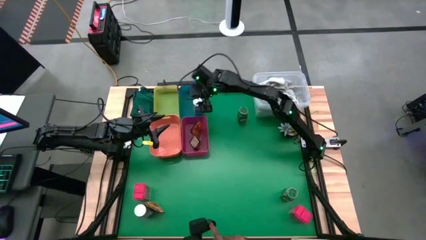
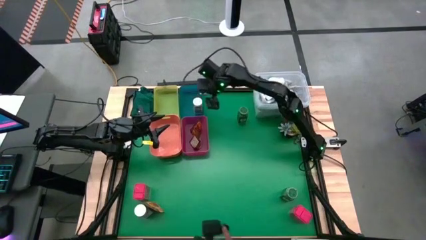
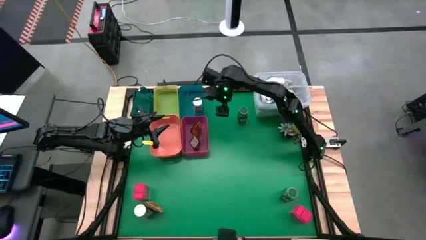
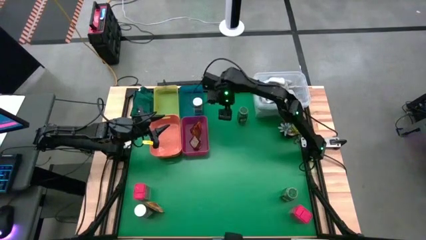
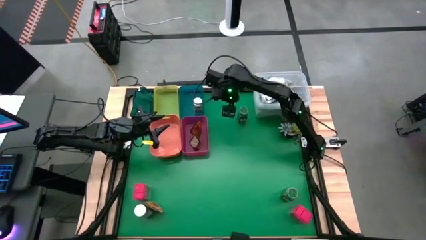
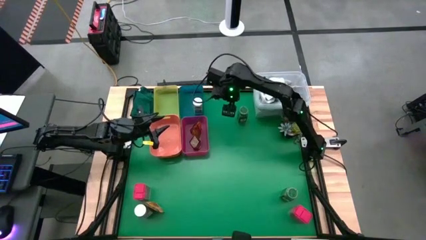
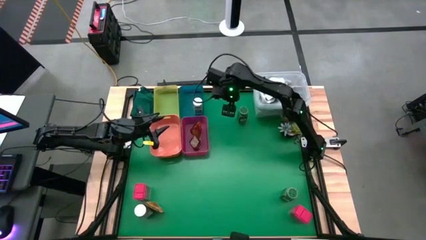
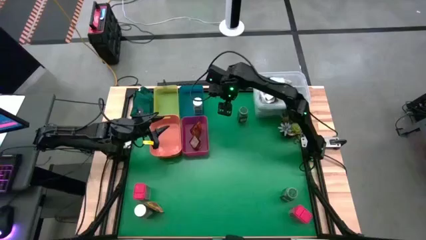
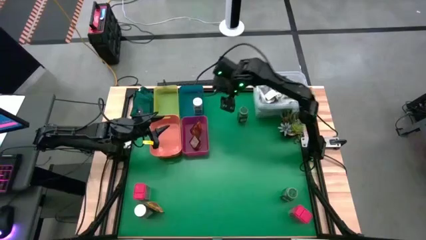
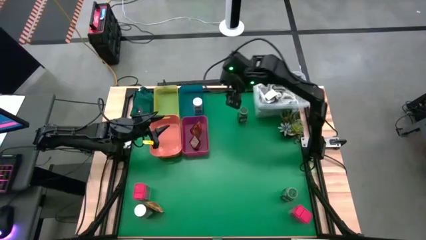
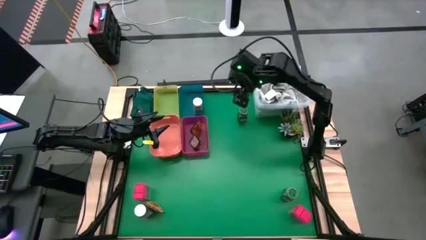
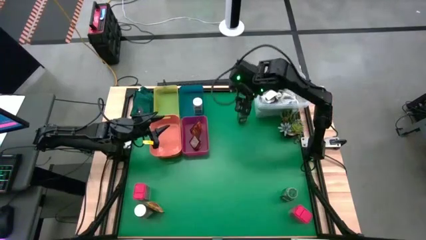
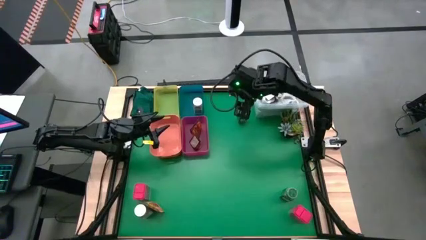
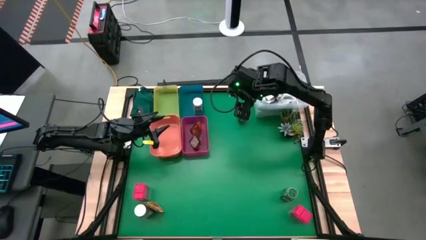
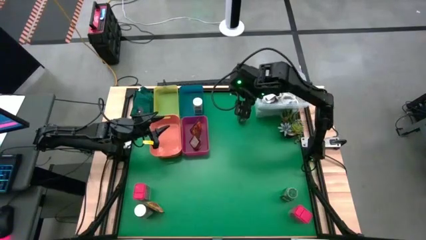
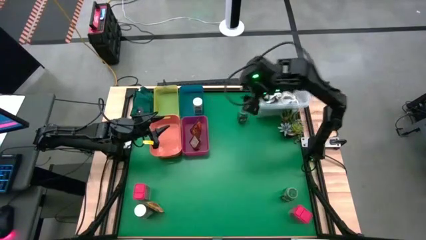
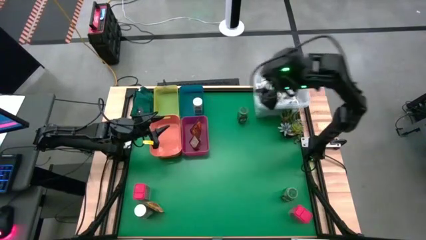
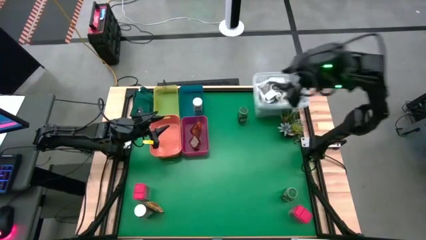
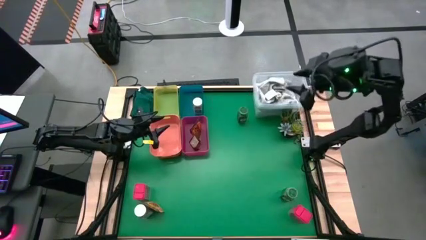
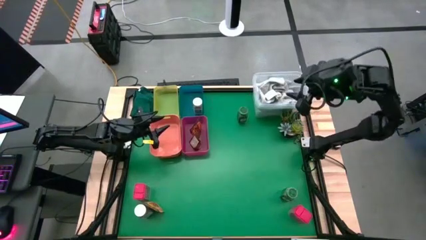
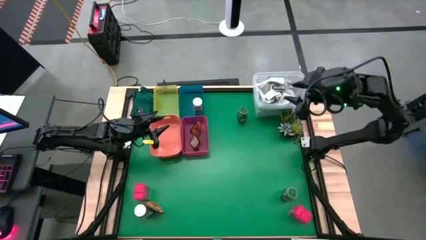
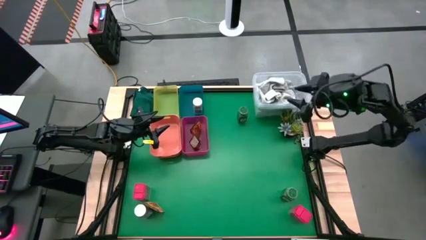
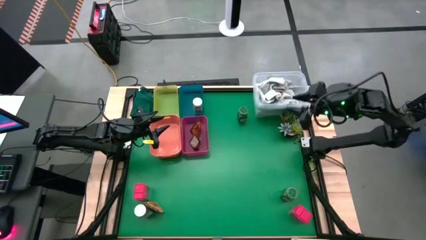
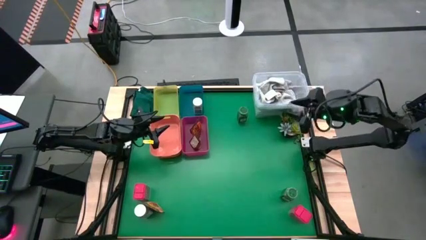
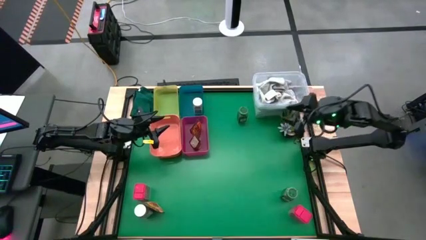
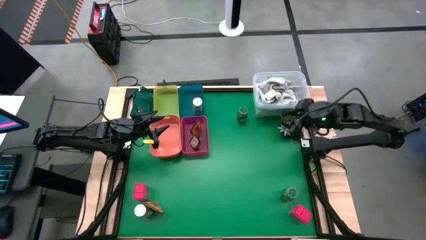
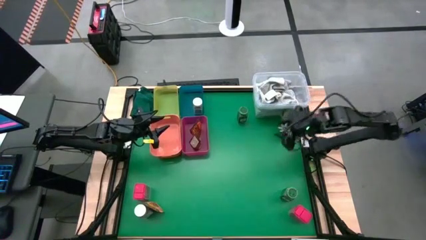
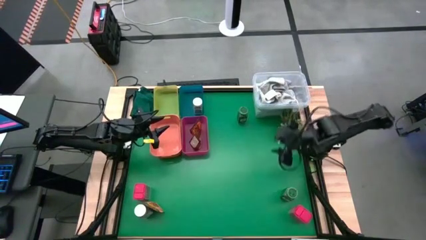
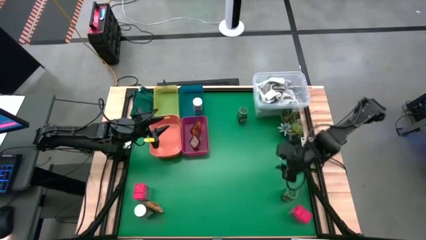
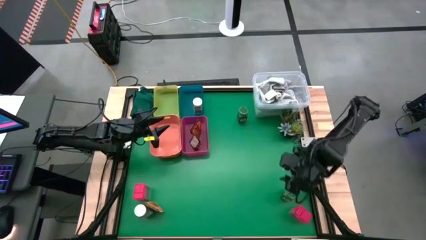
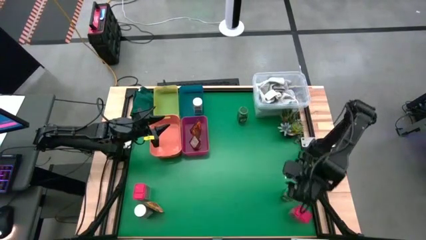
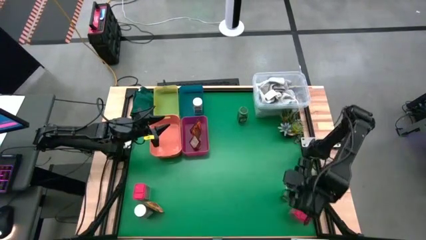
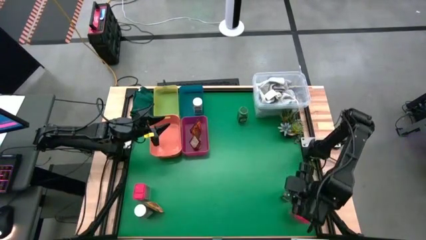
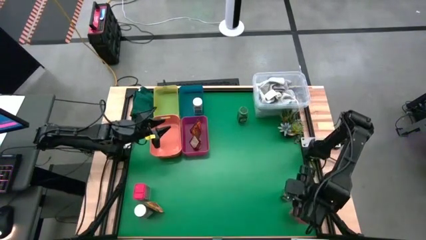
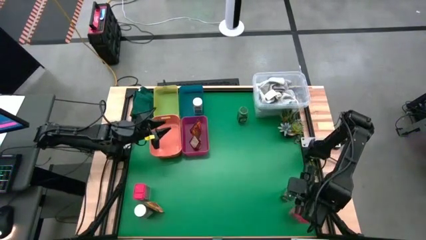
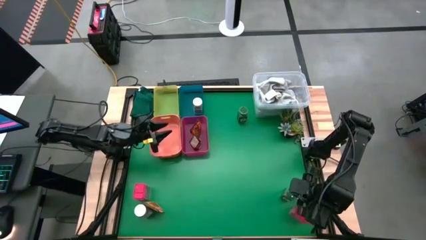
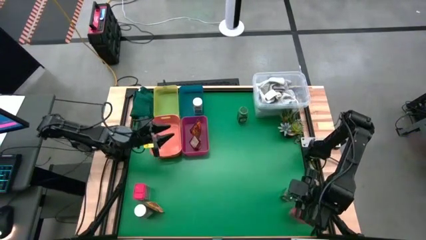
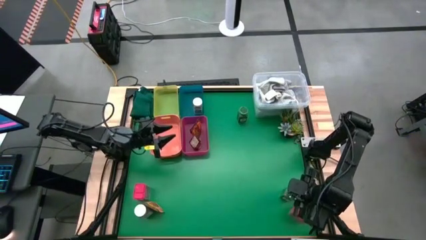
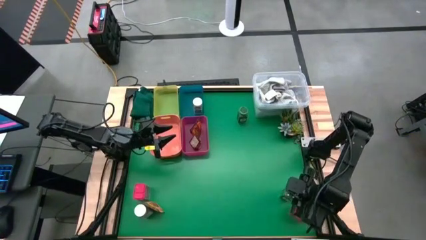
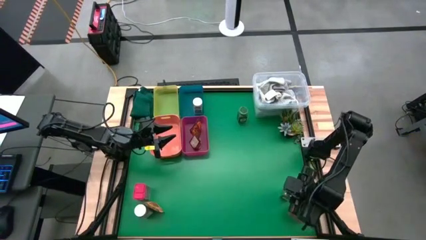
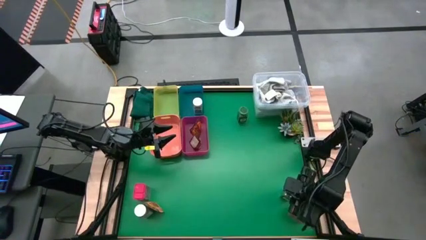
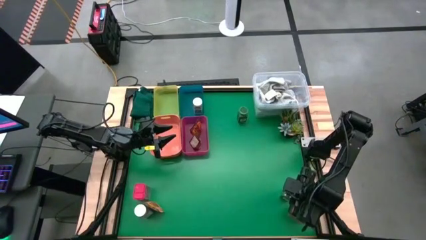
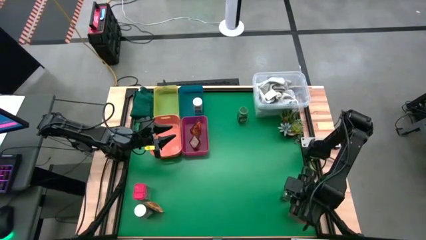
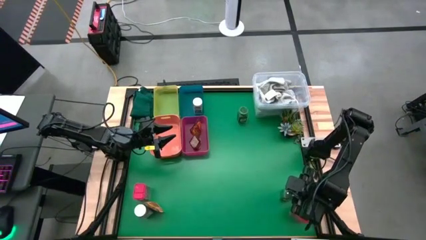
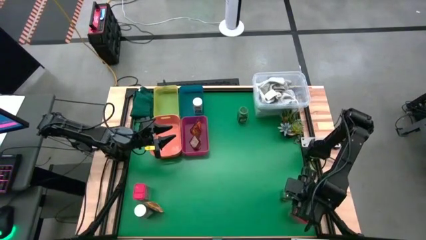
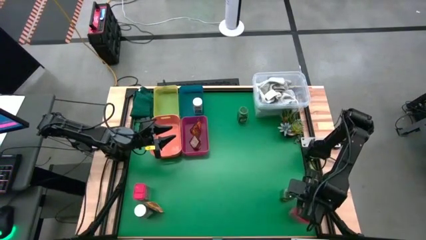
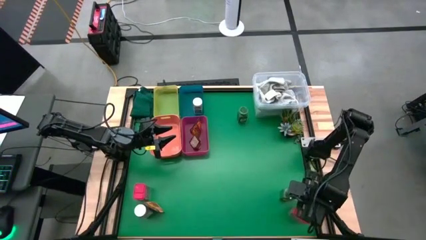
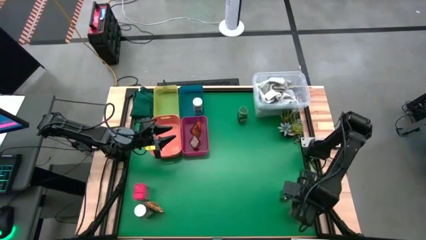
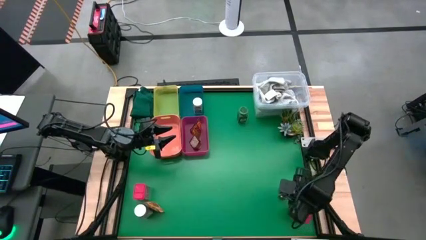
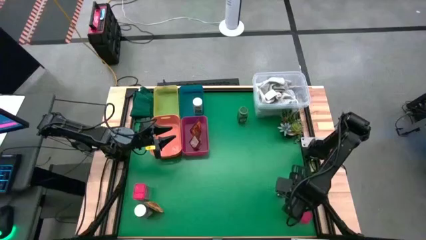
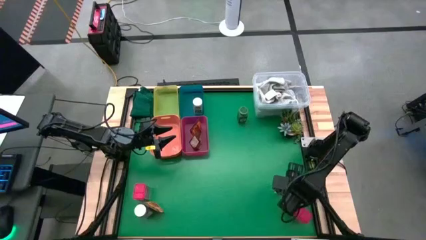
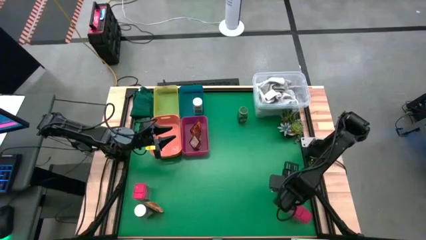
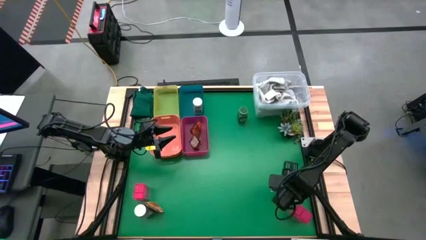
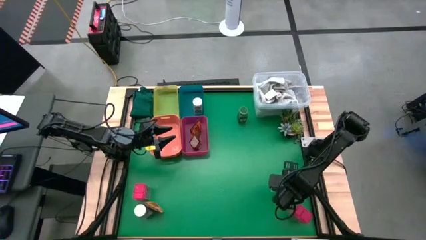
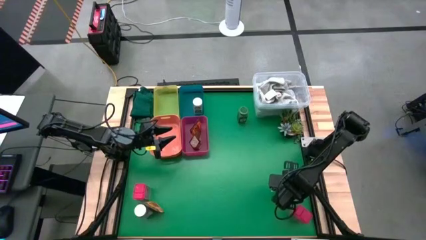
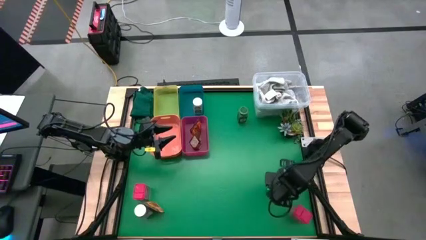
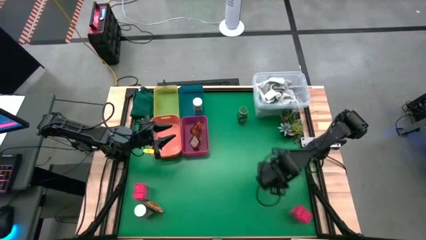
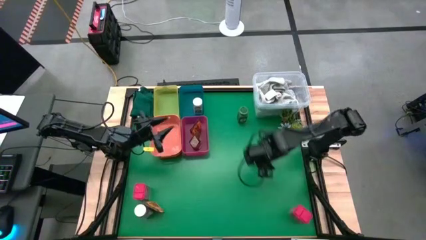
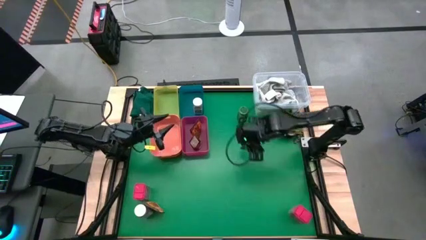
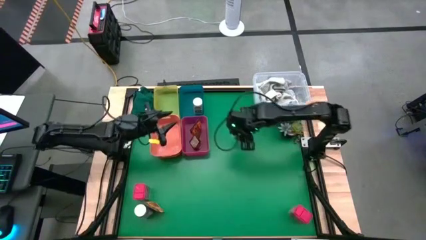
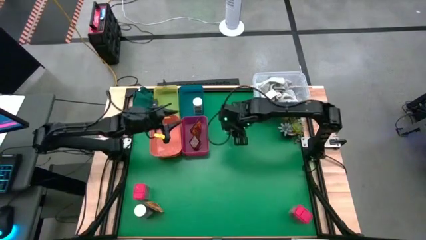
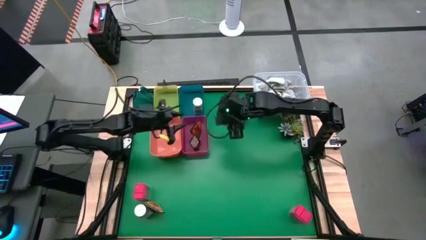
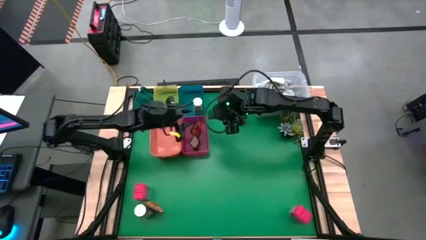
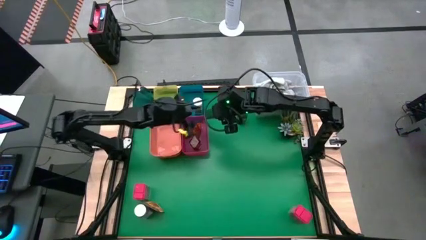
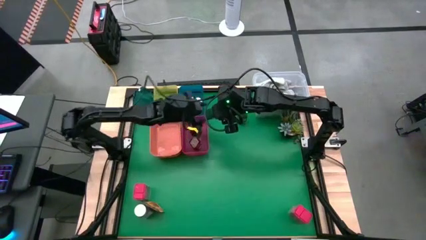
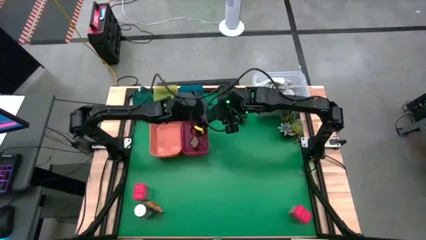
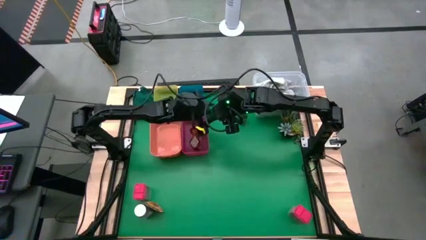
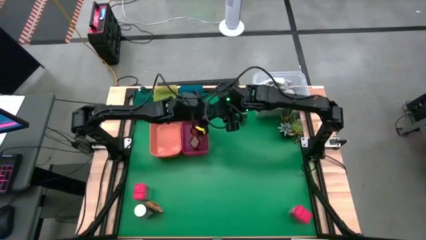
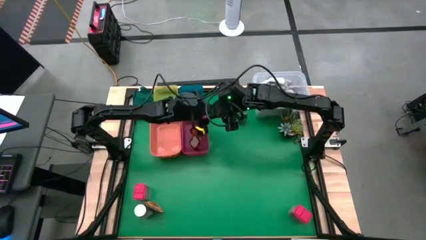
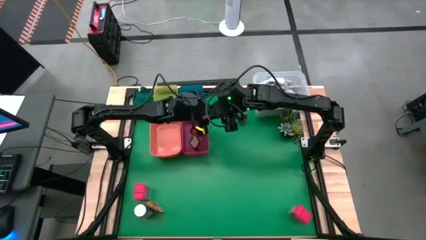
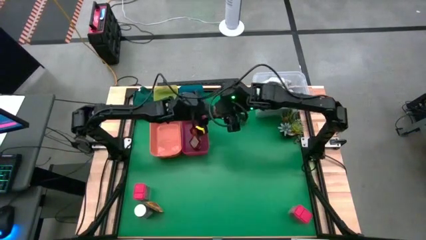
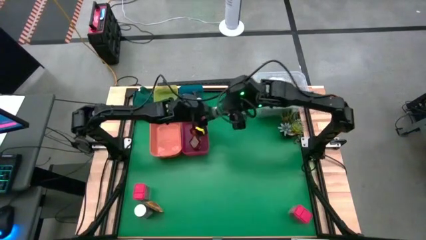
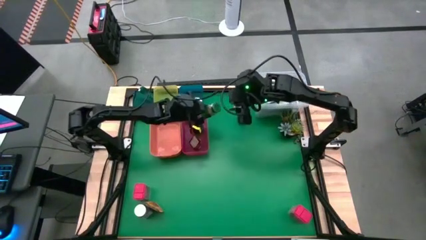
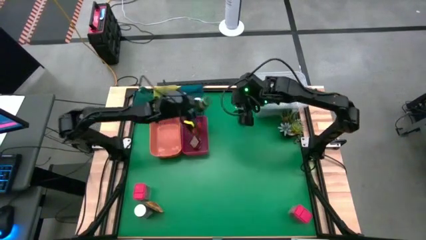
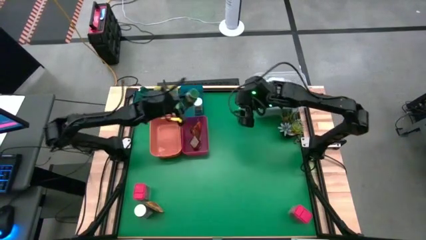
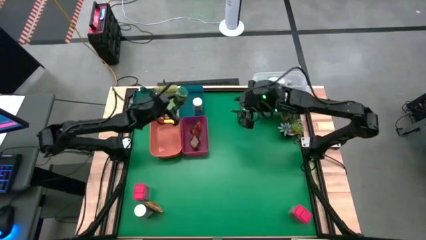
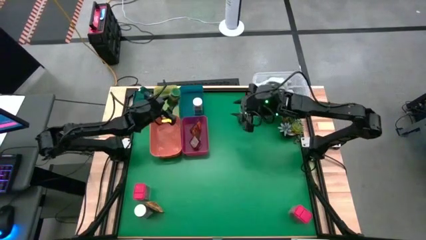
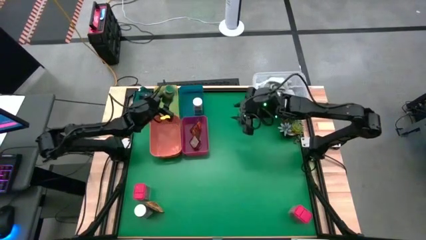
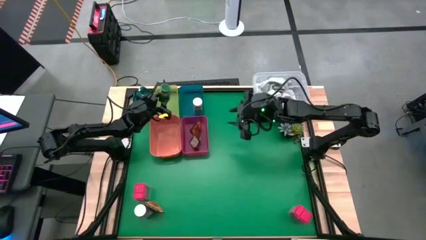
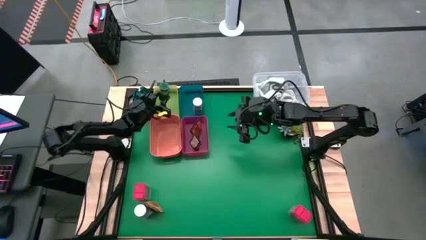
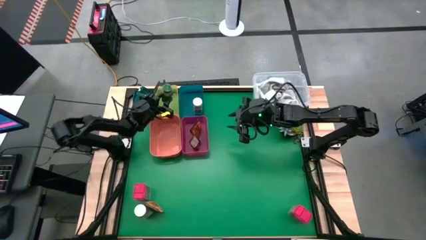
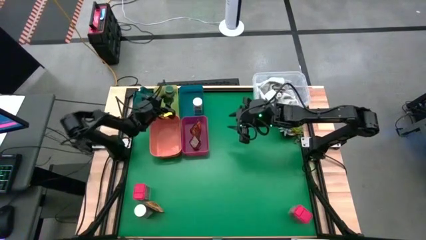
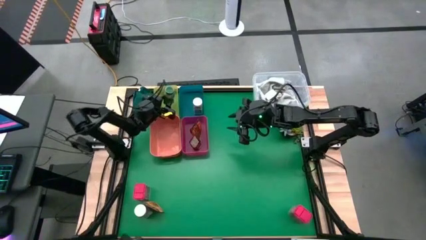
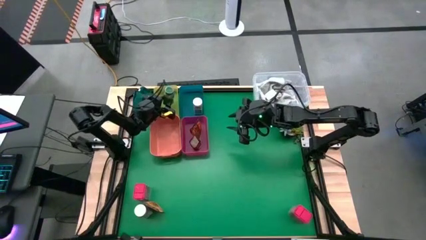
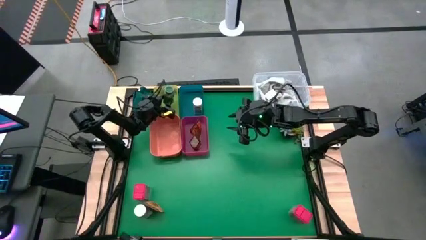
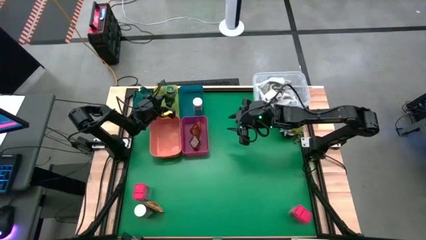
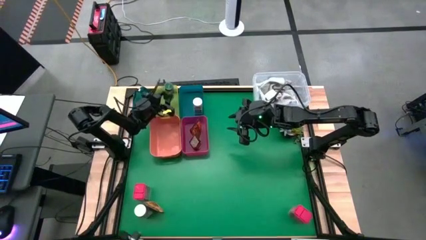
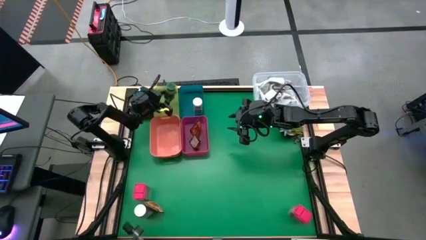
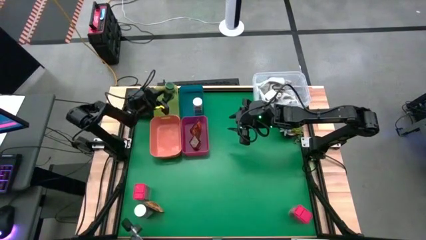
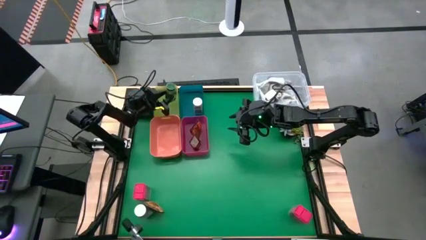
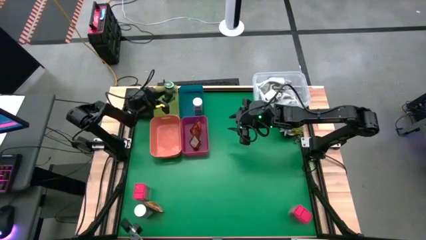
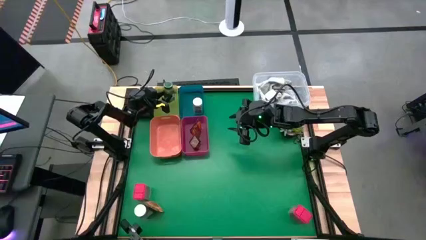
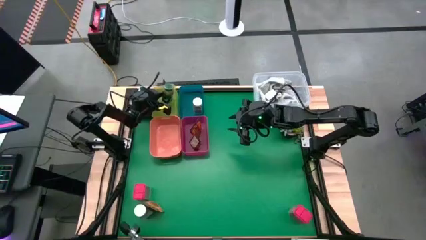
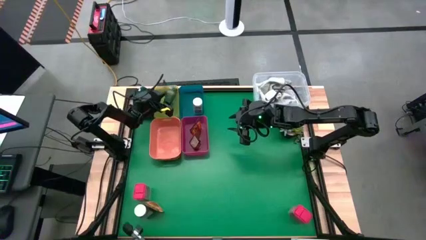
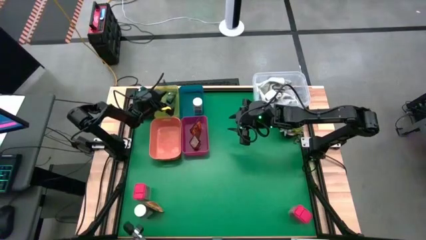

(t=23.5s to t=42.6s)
Task: Sort spices by type
Put the bottom green seasoning bottle into the yellow bin
